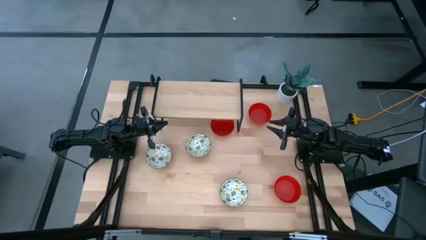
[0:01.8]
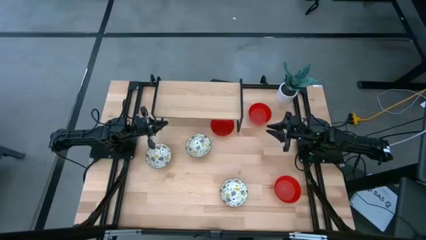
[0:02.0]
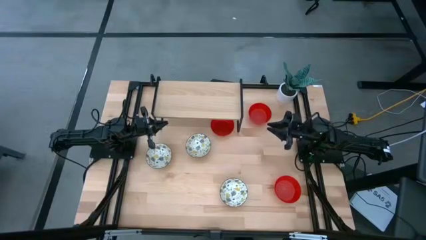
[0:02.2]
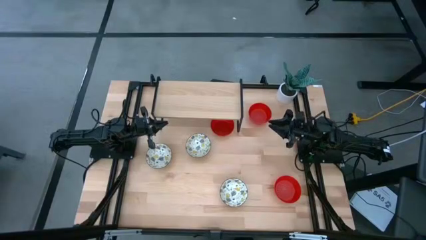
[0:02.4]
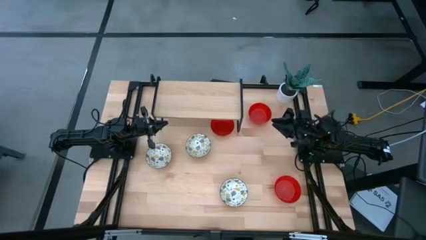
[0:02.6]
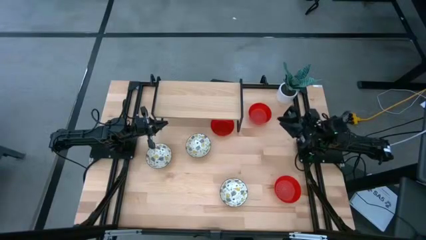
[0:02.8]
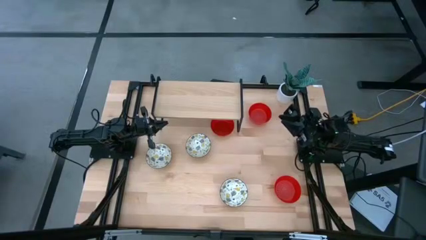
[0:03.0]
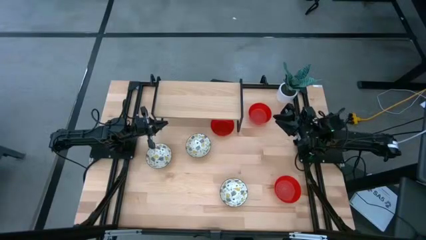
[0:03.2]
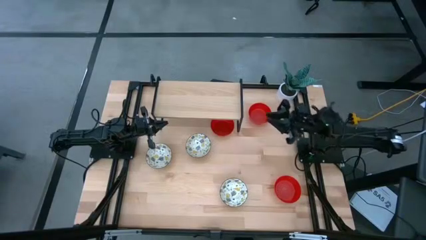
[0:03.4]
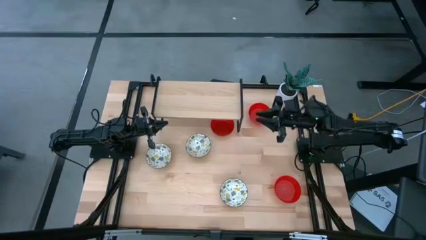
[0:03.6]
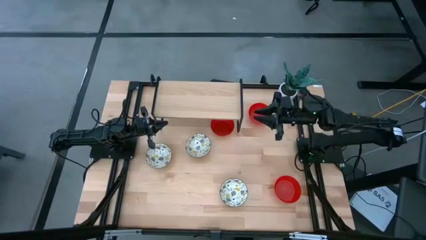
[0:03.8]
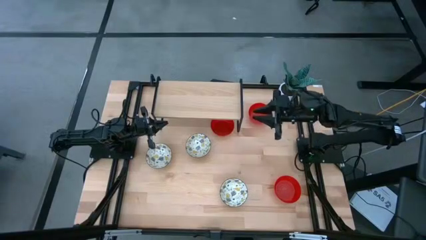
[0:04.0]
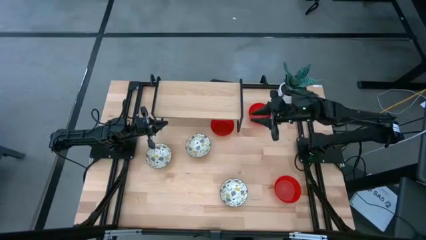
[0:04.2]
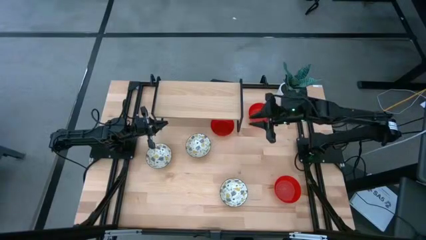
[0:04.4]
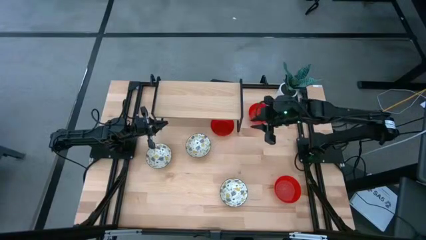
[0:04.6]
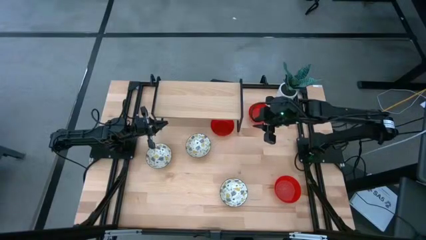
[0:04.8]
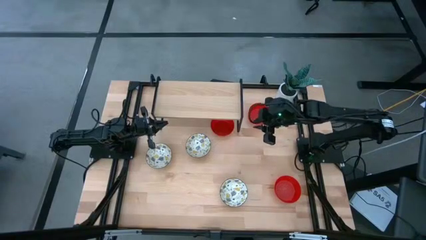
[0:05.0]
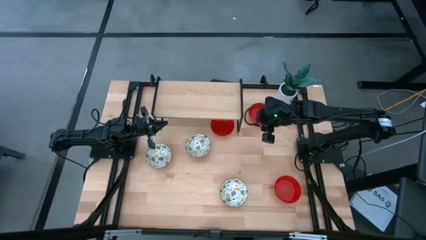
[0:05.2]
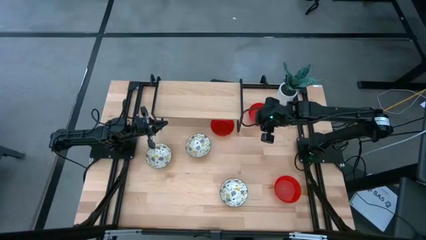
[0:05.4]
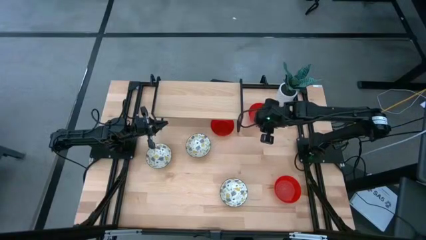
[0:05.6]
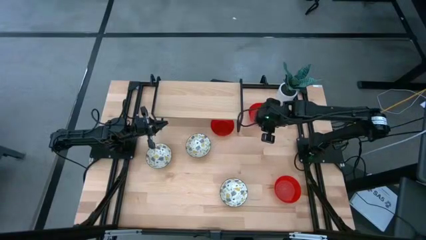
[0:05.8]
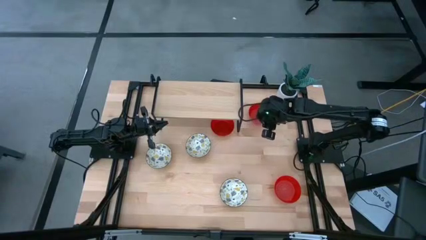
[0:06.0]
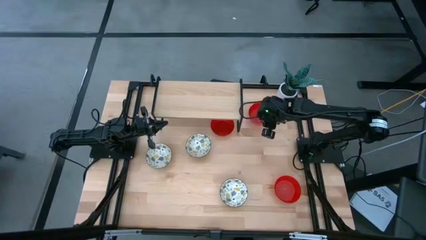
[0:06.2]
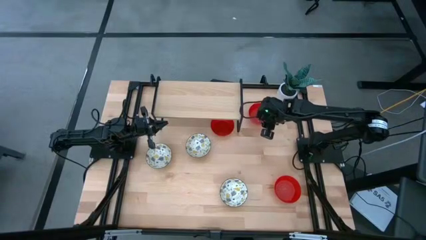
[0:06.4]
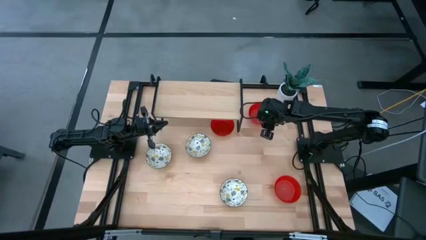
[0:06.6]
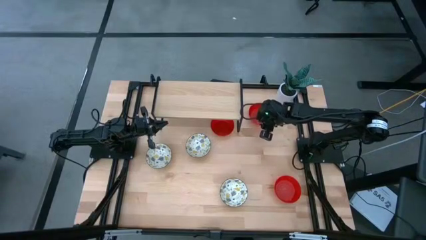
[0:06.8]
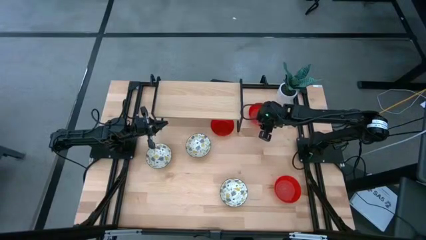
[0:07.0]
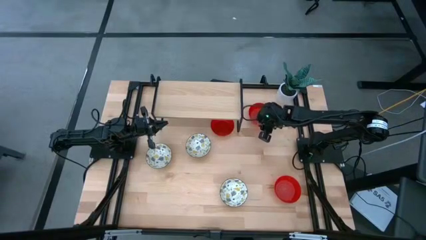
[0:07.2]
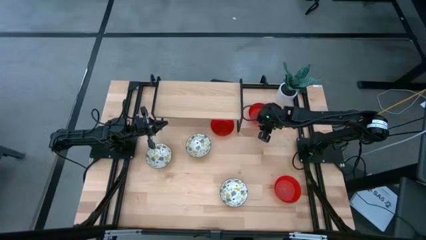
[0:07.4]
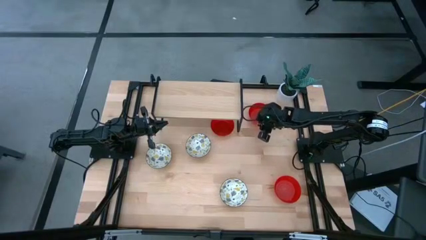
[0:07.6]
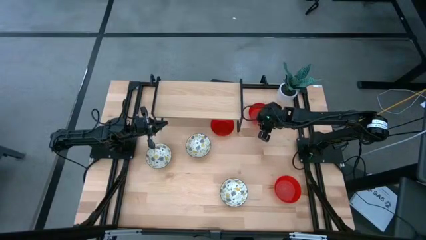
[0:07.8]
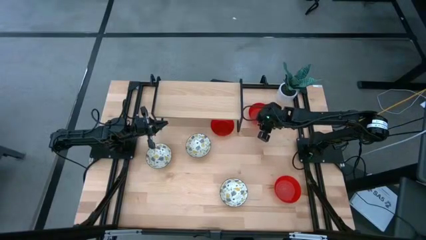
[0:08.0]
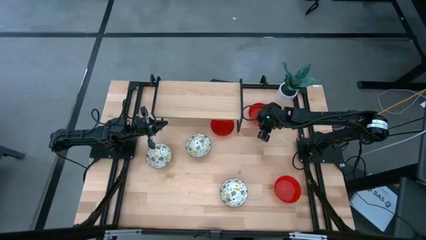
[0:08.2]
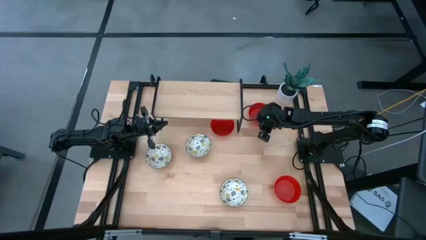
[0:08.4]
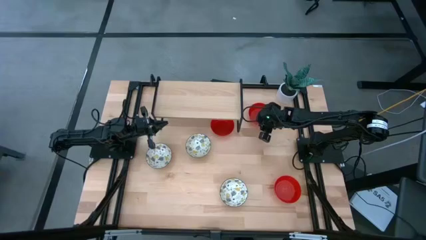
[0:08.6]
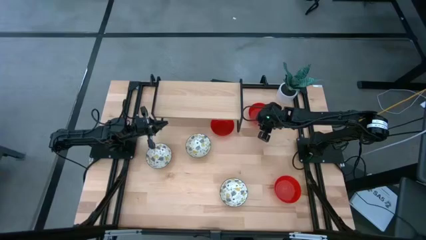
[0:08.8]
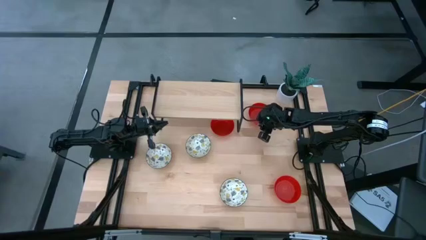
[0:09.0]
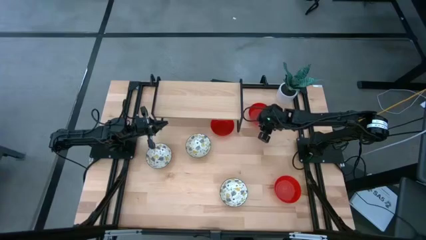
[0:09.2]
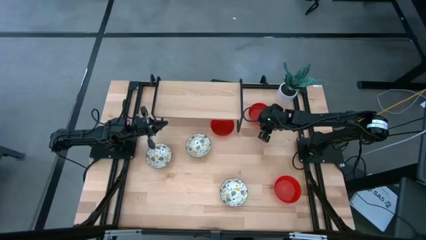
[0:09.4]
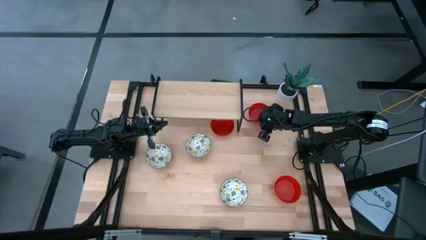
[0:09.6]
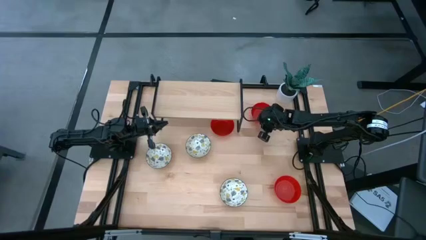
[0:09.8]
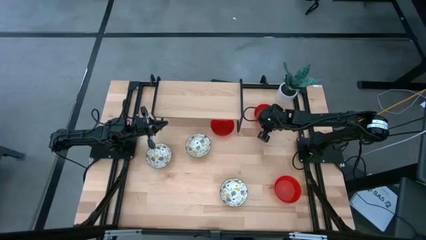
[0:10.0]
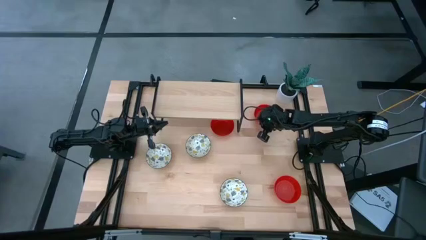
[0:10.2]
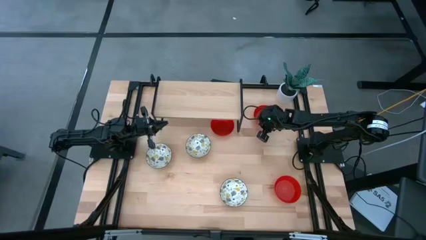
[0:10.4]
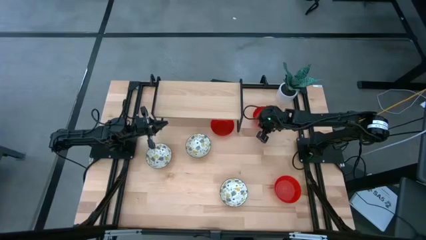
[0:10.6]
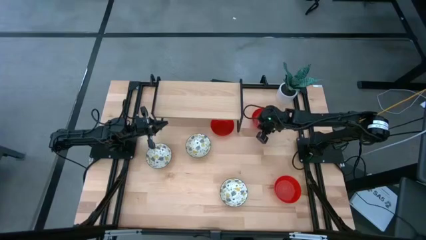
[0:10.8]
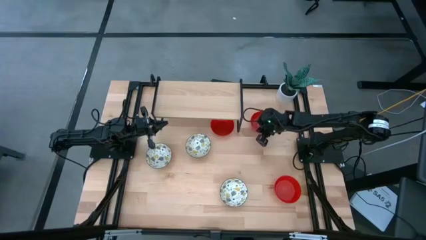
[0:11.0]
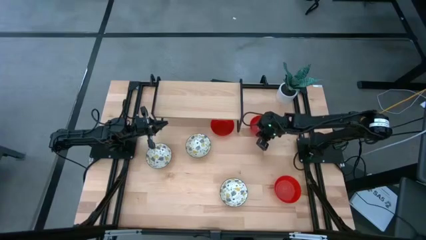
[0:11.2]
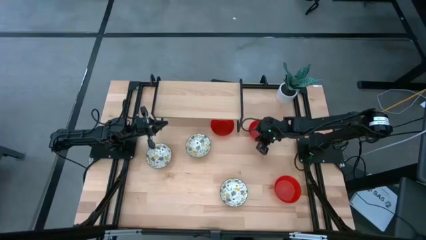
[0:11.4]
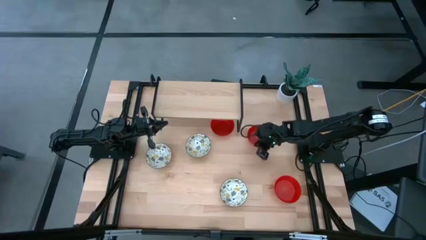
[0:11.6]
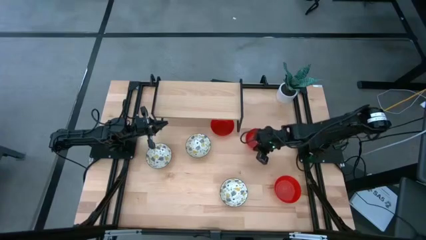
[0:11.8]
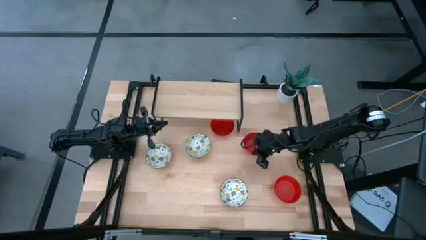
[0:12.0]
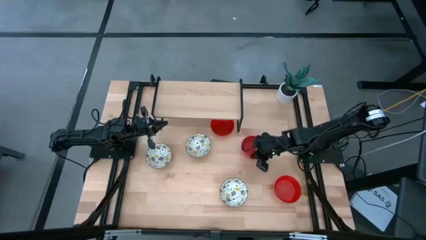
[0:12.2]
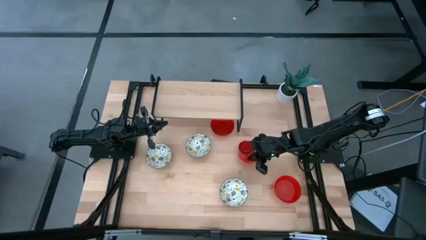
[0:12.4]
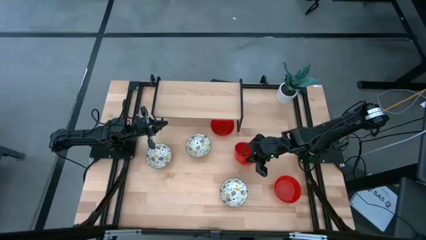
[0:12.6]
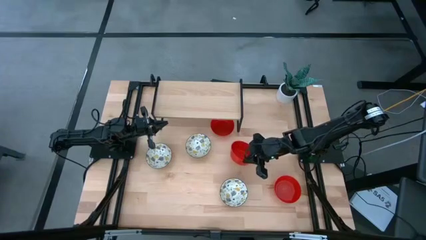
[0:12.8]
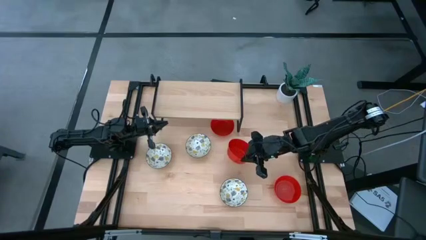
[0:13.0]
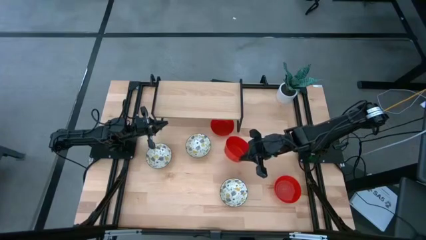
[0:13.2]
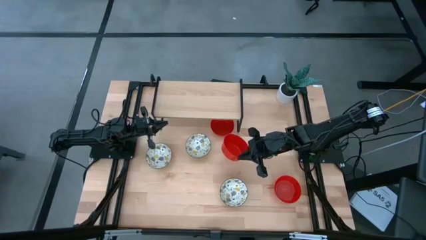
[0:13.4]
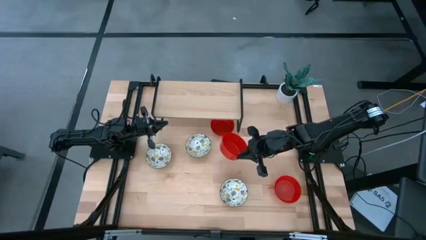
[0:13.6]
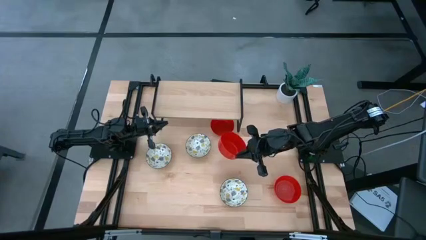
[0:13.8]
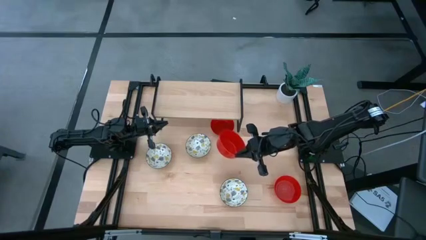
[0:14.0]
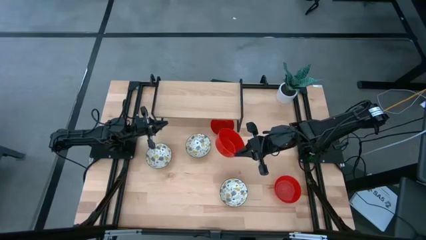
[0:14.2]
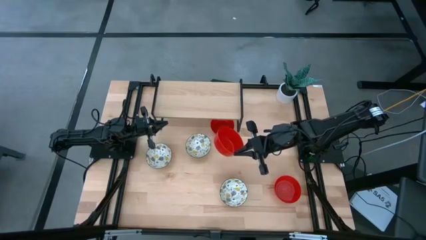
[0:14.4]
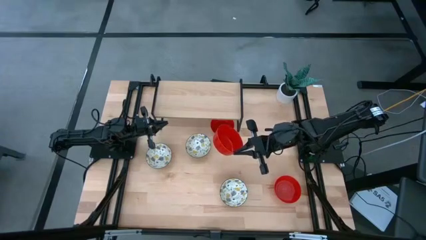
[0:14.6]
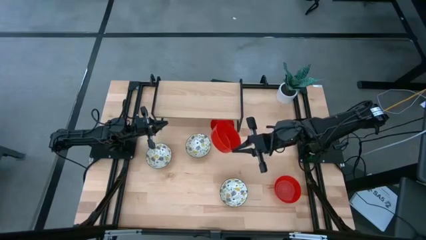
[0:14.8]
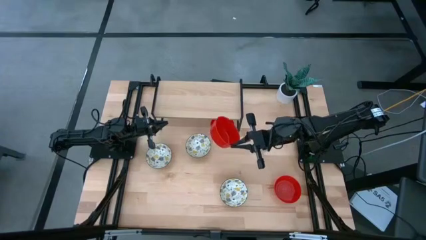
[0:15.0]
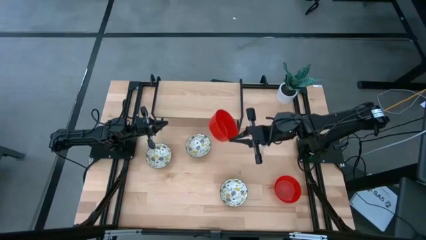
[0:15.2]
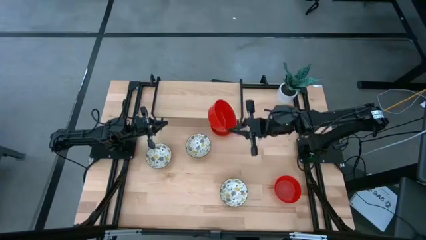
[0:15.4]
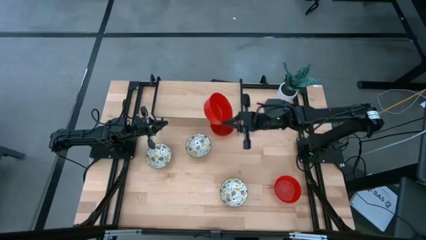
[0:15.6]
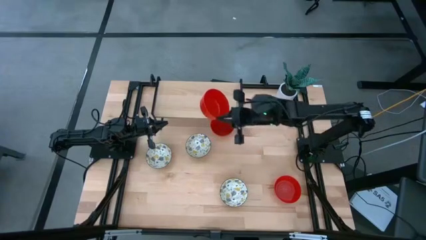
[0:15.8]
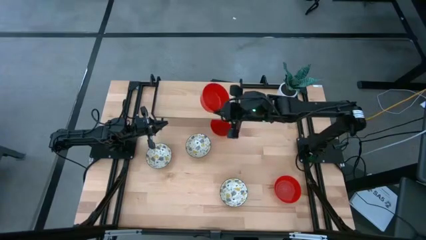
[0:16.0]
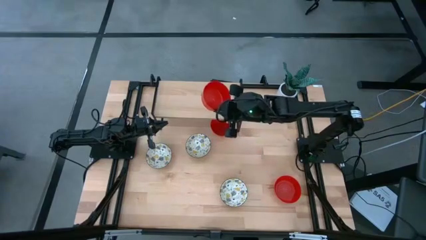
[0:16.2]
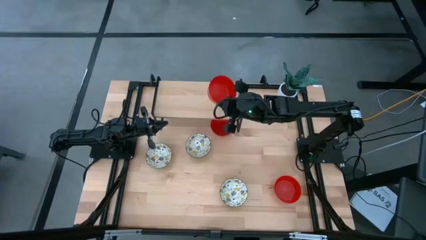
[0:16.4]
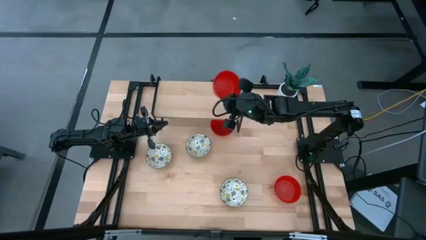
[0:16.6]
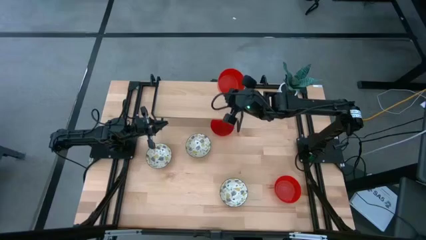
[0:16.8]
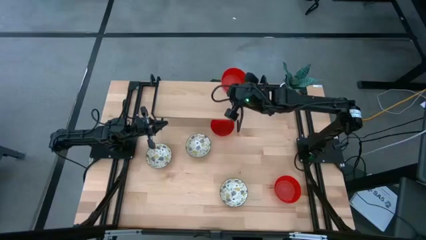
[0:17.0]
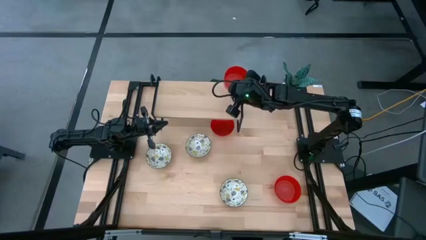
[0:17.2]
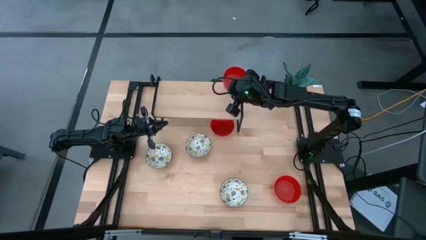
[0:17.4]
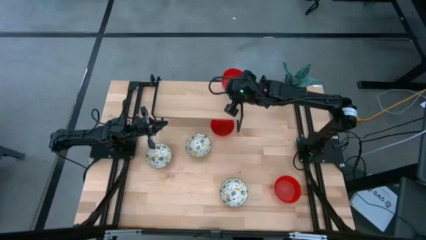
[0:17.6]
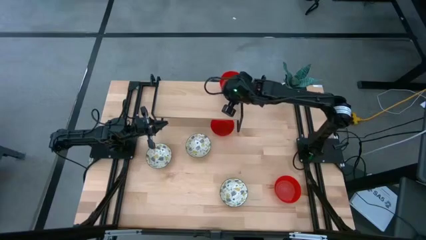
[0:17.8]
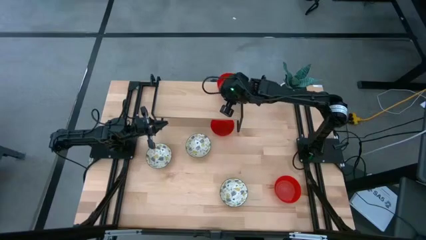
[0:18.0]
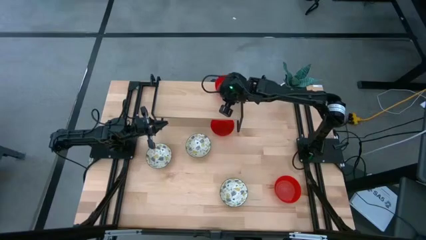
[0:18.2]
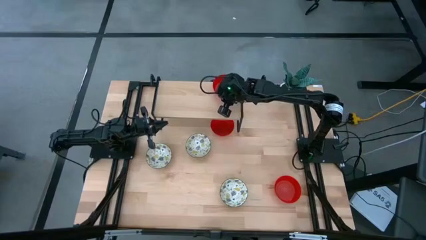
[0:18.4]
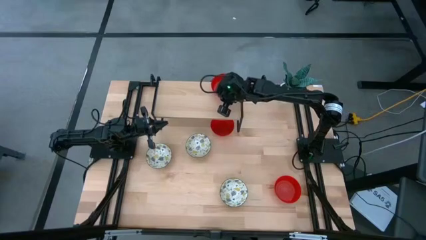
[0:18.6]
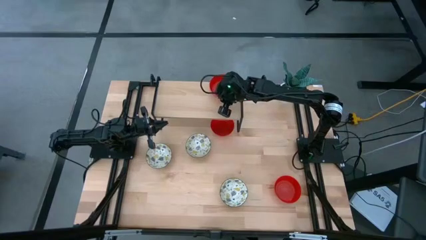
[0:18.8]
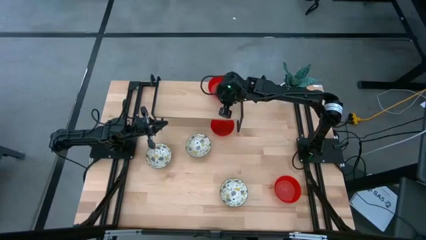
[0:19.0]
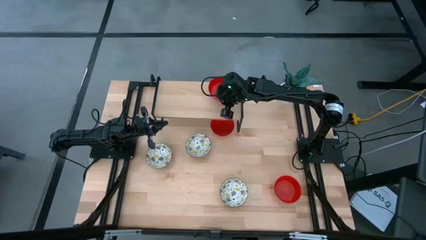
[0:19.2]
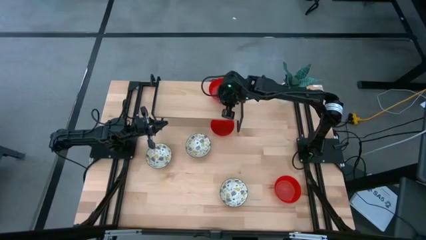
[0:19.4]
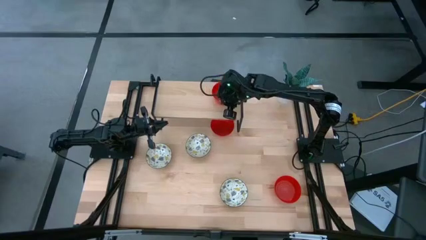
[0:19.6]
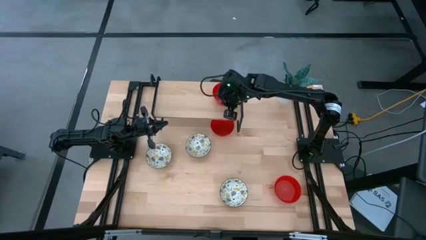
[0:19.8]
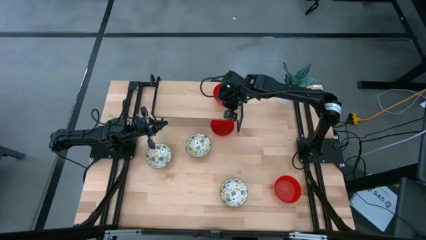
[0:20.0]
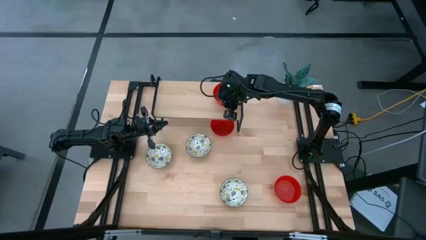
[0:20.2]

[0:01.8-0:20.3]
Task: Pick & Place Mini bowls
Put the top right red bowl on the shelf
